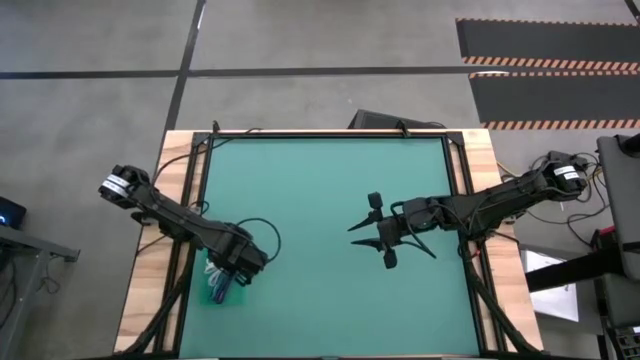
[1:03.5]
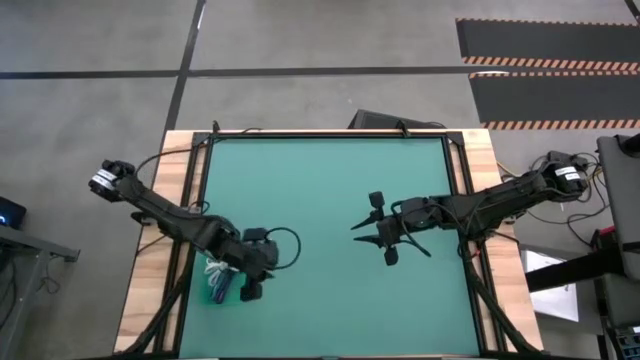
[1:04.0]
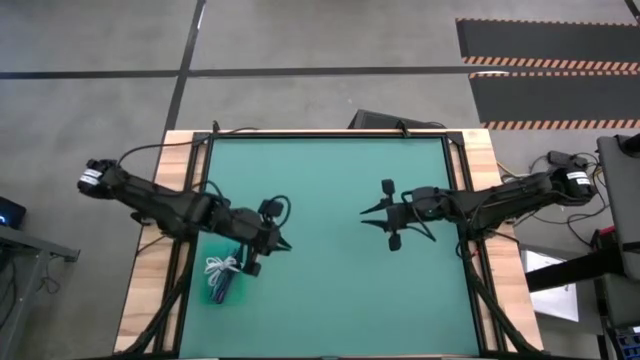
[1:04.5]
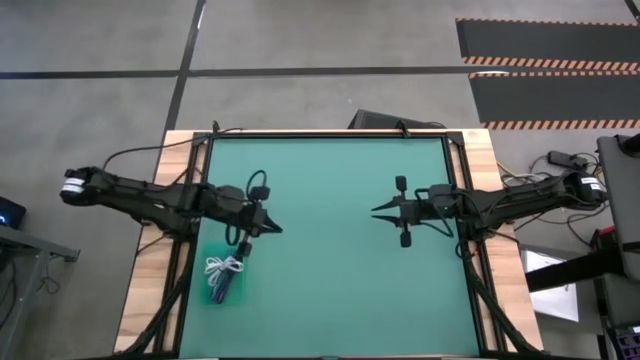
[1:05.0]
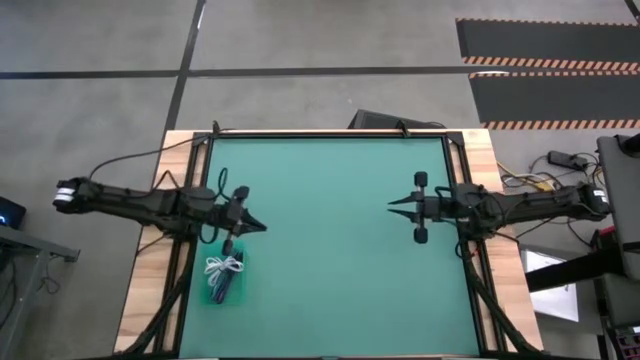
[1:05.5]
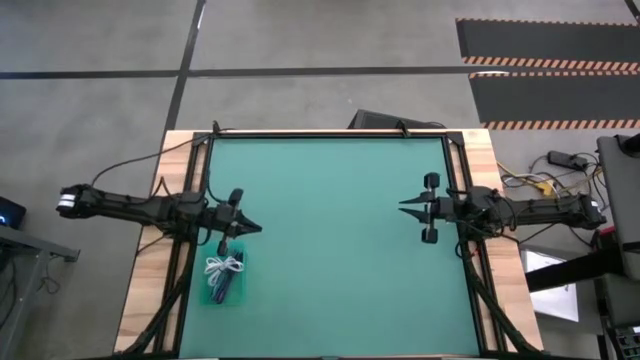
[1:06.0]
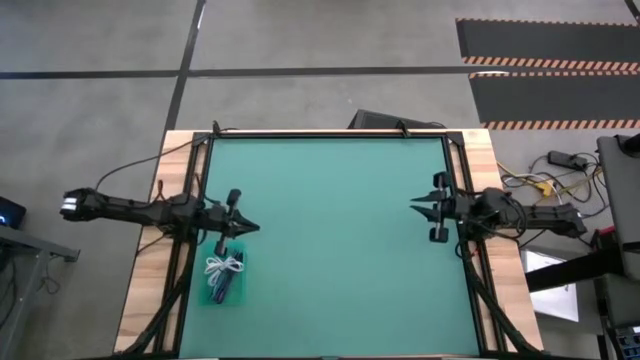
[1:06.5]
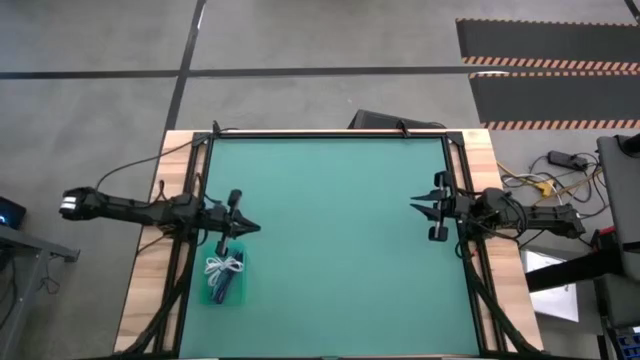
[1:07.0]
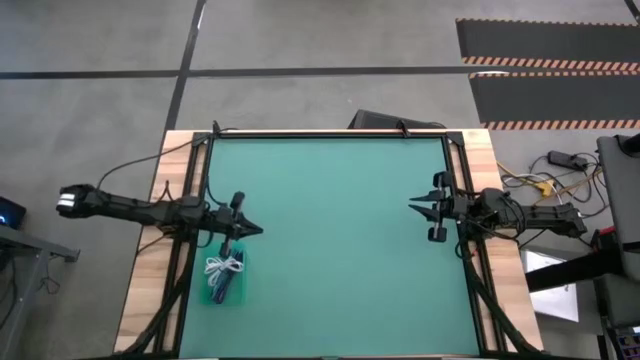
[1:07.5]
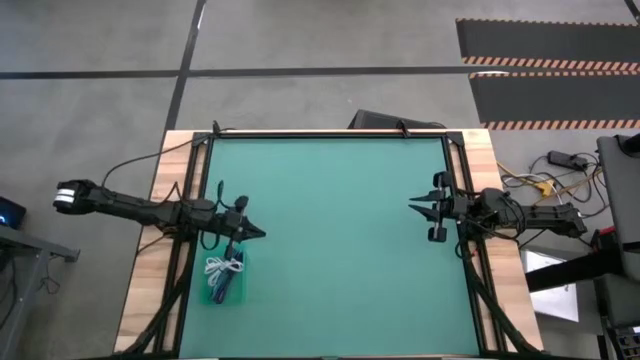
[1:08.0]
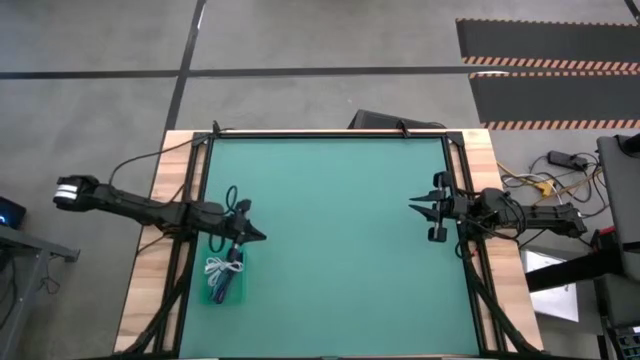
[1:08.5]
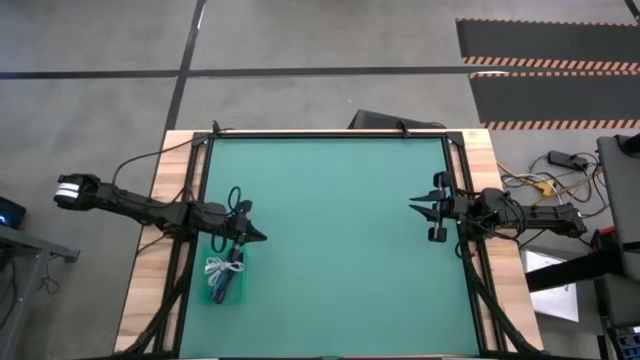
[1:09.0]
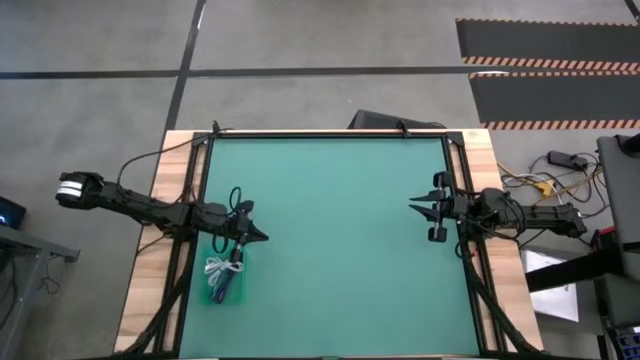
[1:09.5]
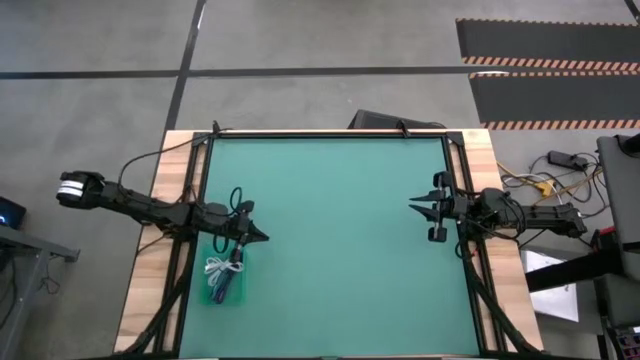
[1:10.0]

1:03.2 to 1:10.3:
Task: Pick and place USB-C Cables
Return to Home Position

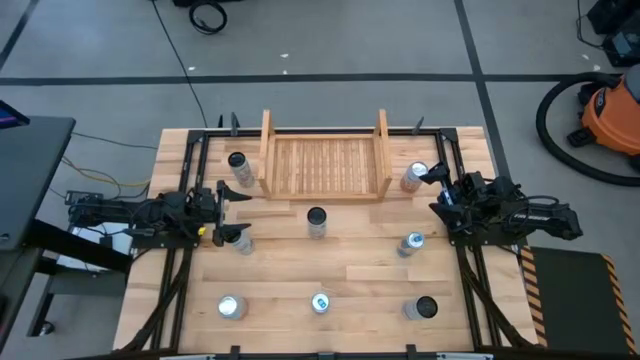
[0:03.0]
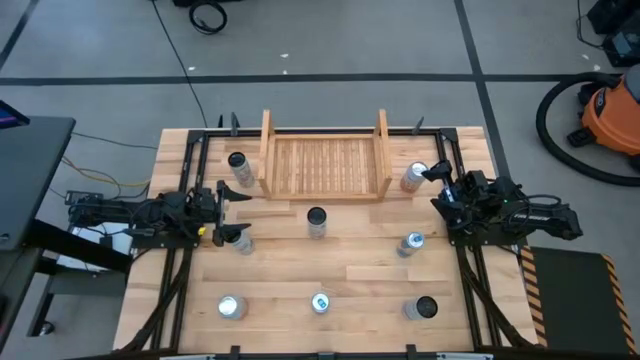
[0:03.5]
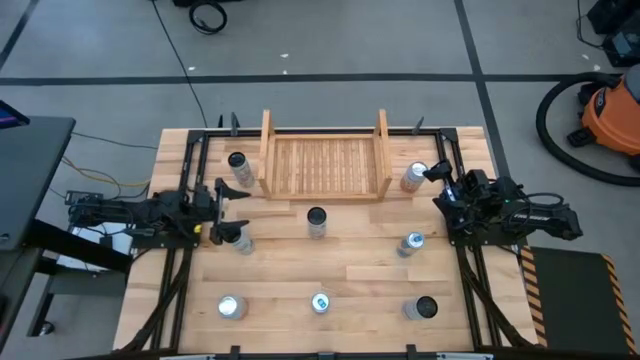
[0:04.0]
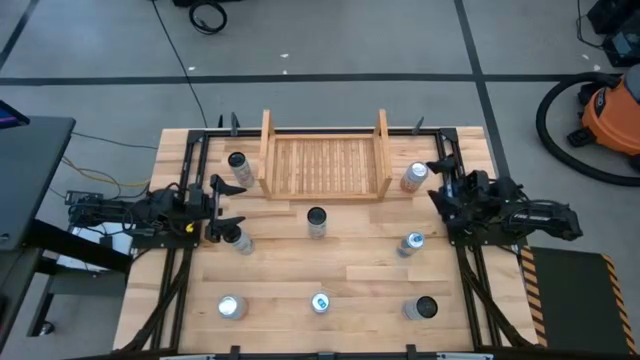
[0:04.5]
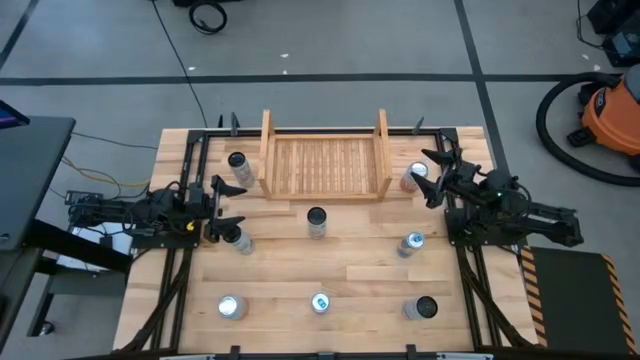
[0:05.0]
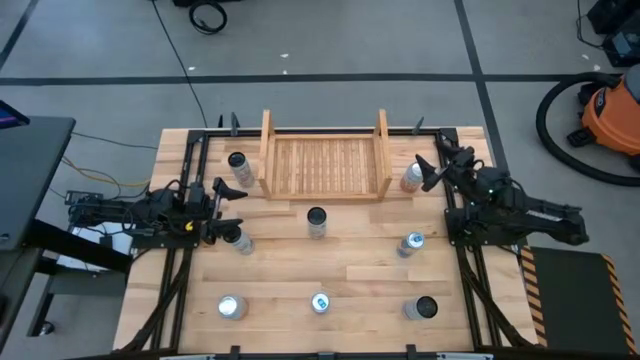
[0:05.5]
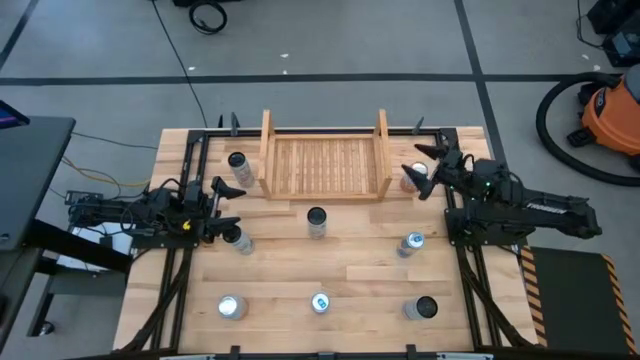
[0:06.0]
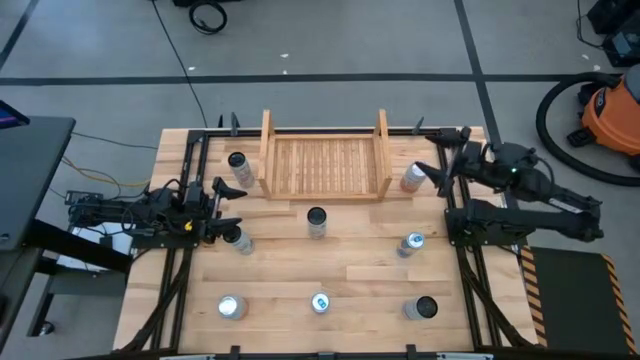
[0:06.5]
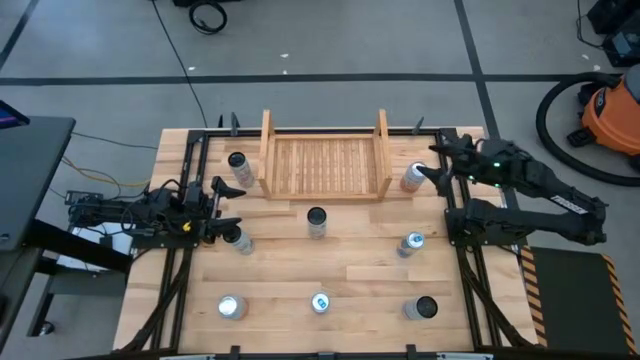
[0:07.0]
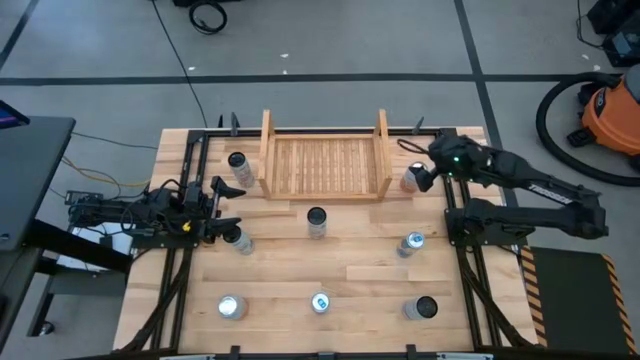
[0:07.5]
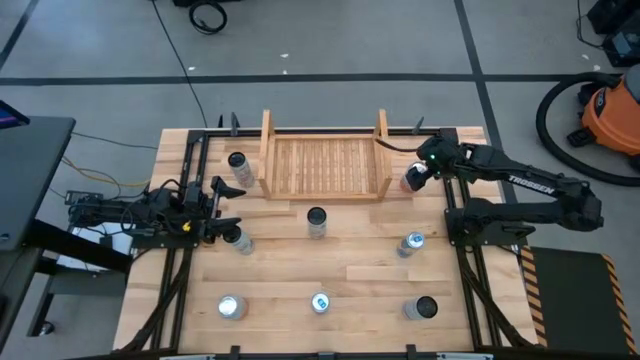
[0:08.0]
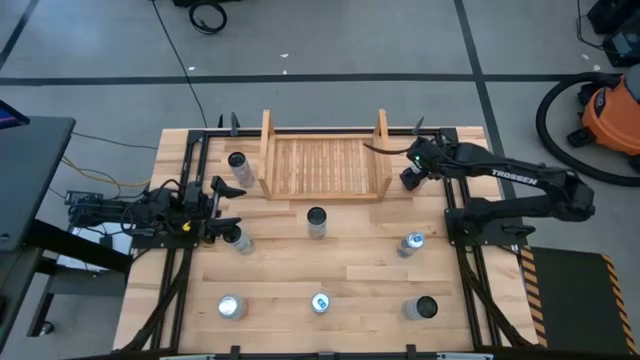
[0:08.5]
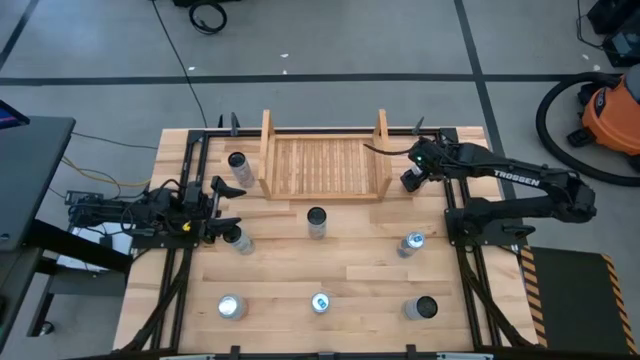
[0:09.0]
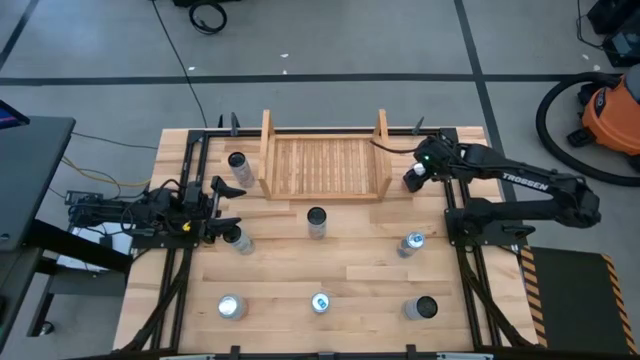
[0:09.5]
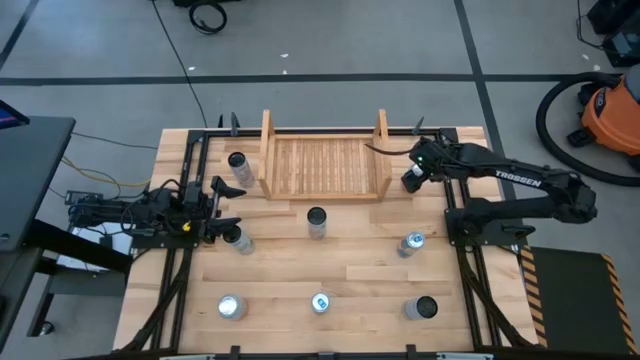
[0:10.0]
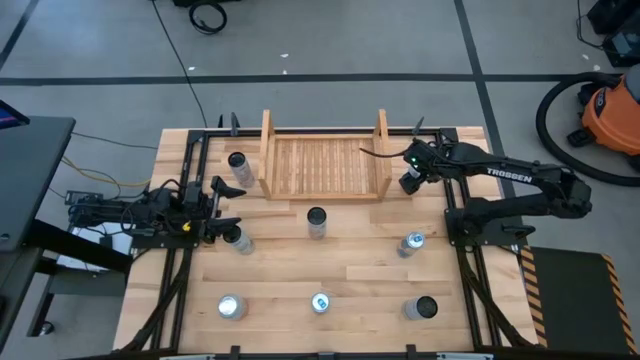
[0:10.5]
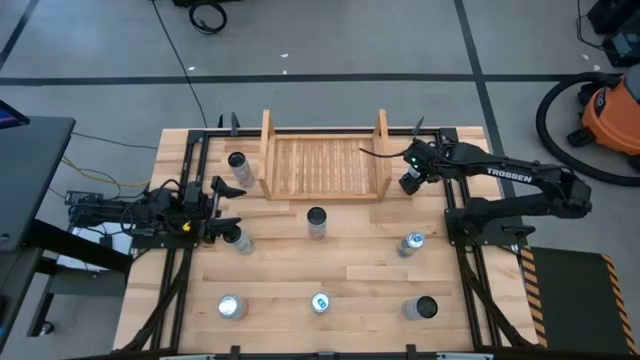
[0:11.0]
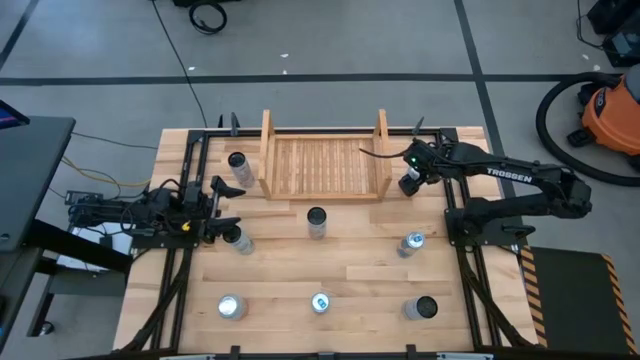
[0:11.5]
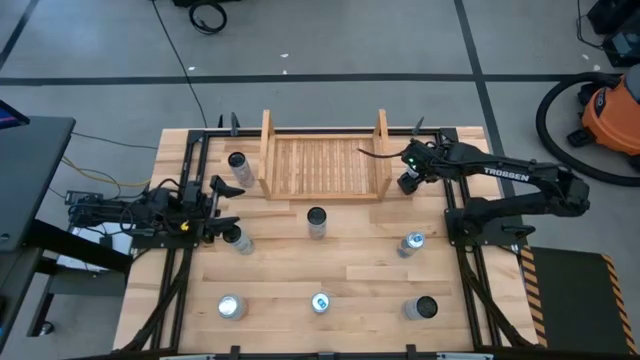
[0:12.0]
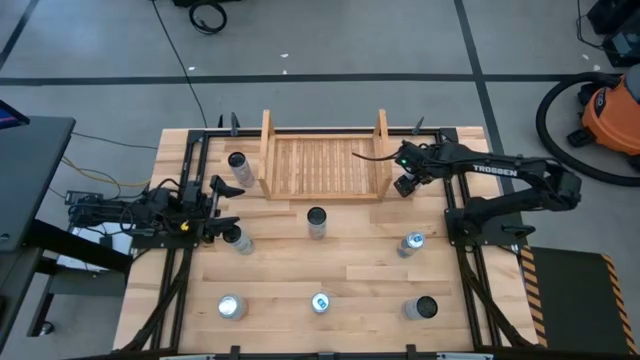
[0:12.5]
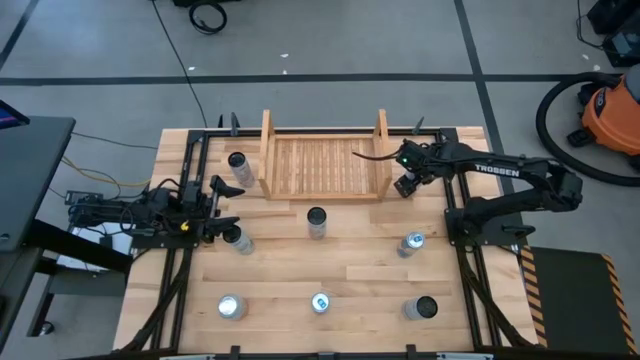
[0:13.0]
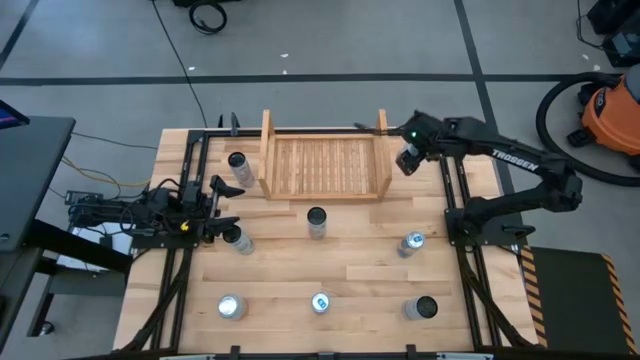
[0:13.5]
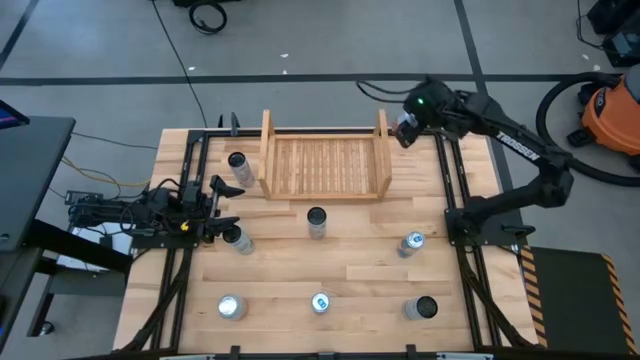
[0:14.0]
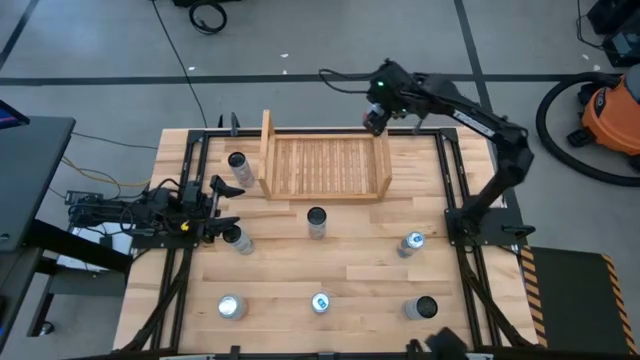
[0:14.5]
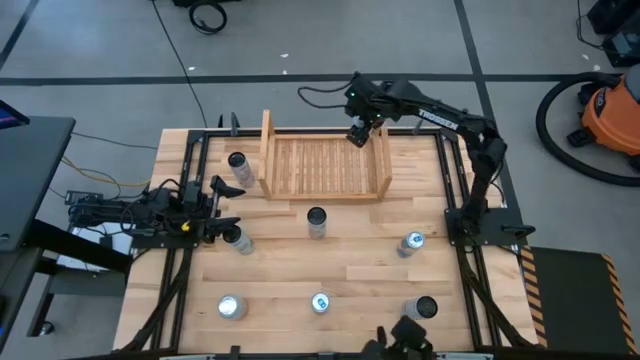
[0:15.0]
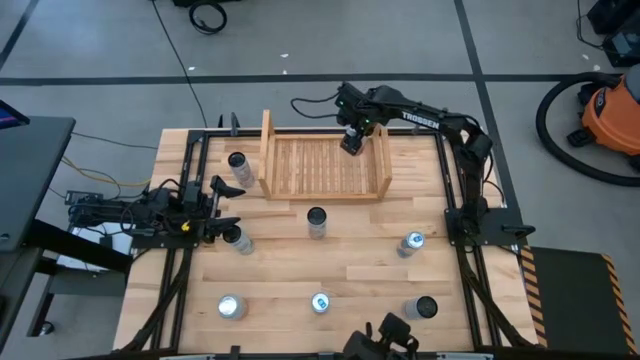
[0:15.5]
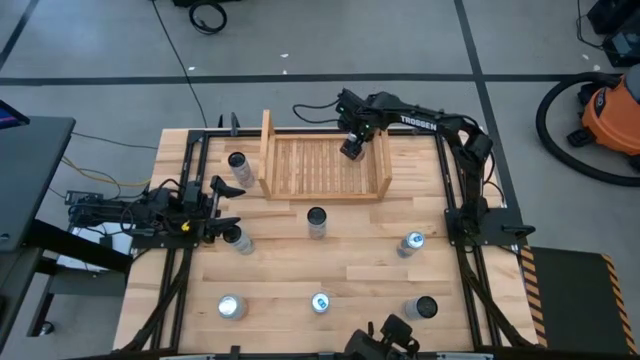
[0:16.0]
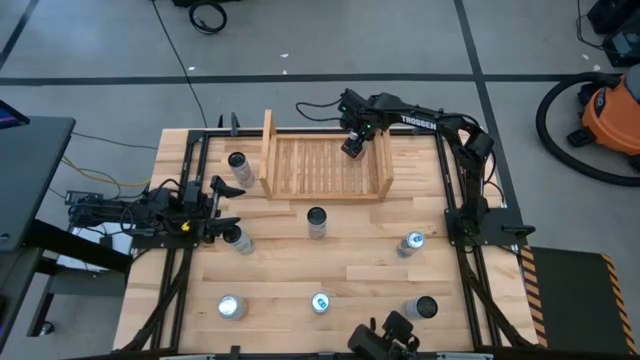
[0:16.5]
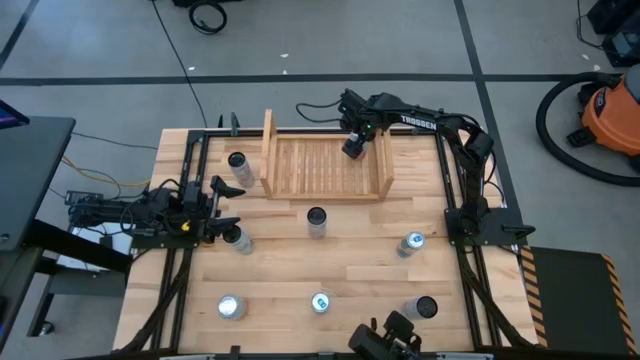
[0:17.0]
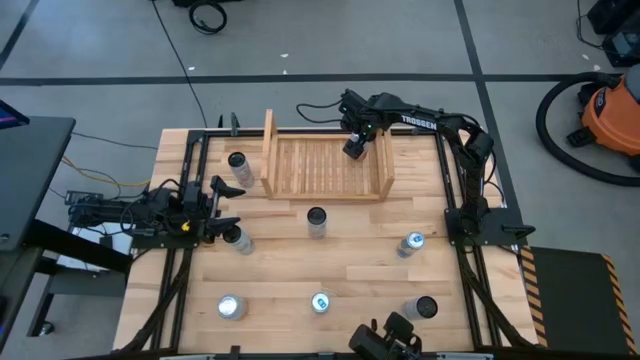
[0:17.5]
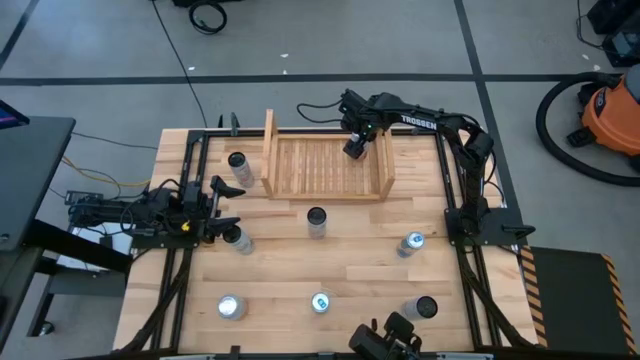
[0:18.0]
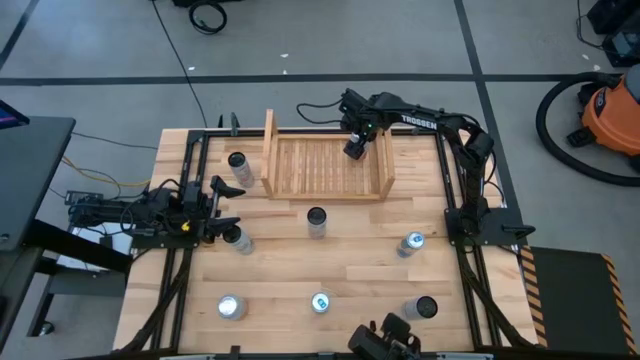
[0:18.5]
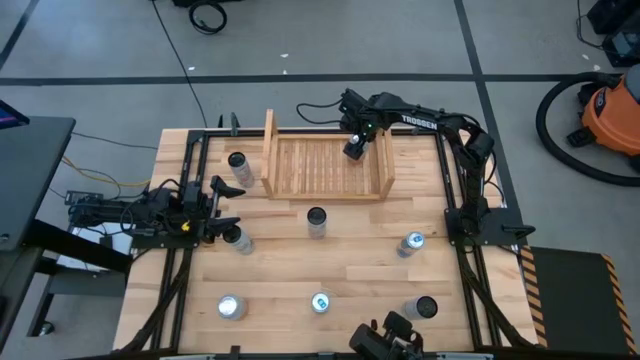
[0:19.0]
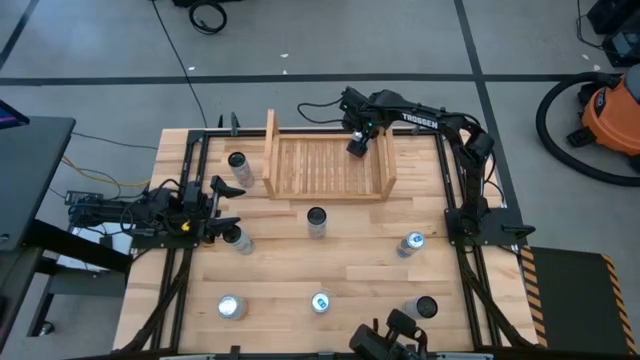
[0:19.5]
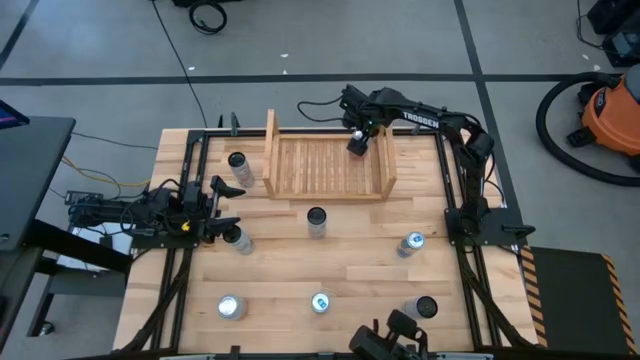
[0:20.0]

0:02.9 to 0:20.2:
Task: Place canned beverage on shelf
Put the top orange-white soda can on the shelf
